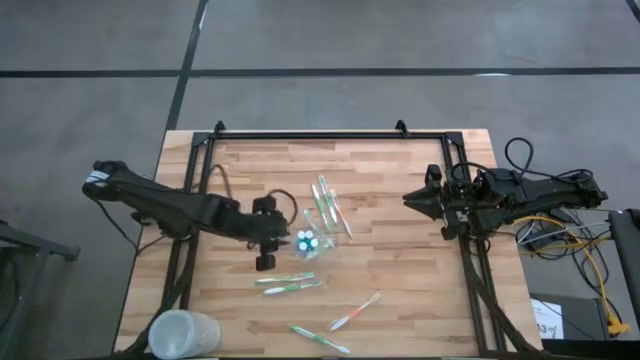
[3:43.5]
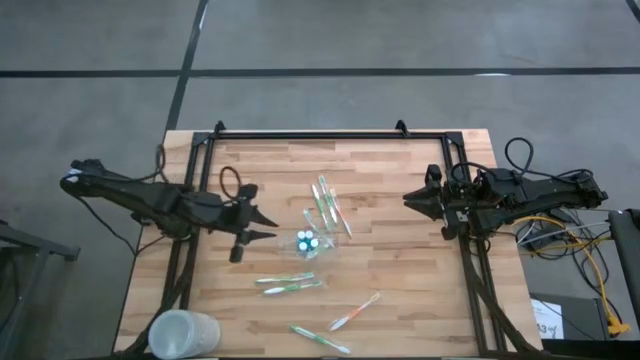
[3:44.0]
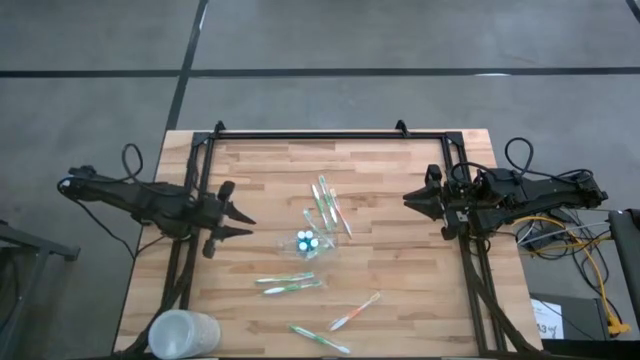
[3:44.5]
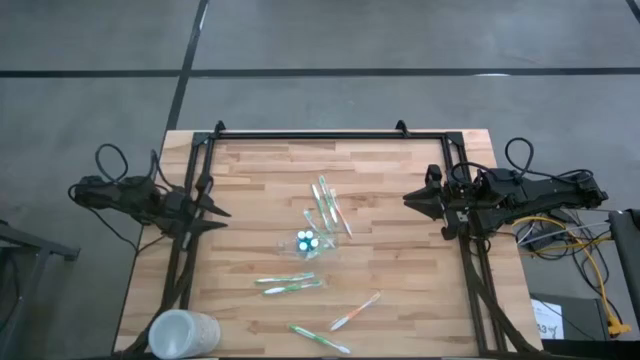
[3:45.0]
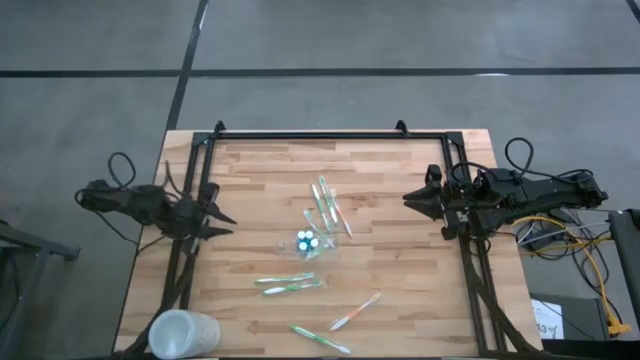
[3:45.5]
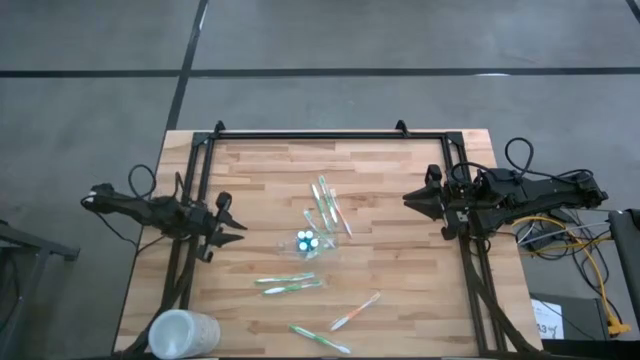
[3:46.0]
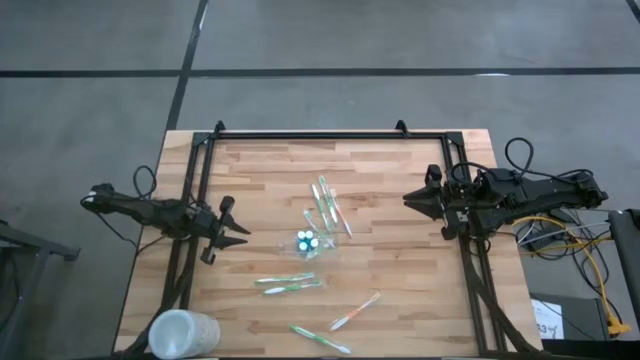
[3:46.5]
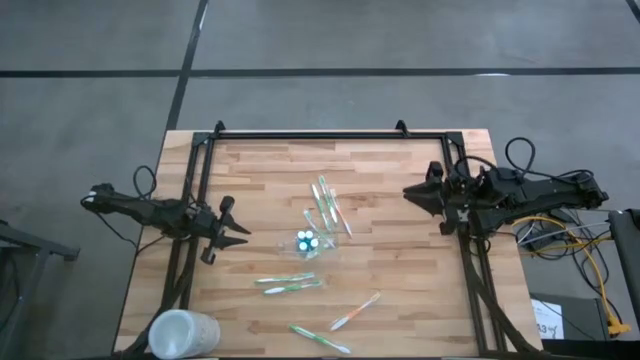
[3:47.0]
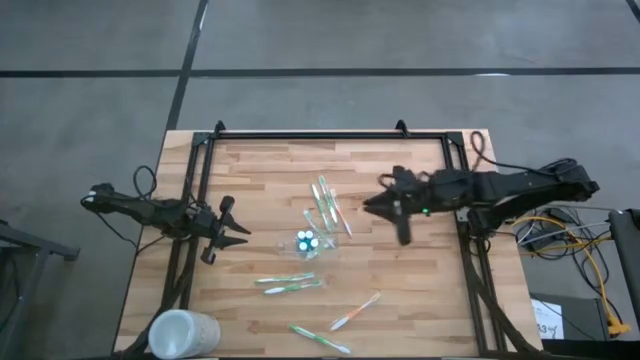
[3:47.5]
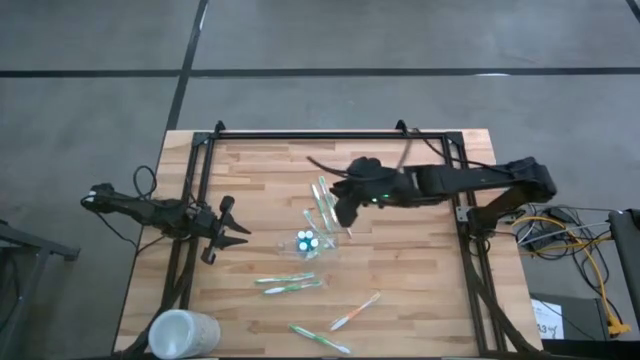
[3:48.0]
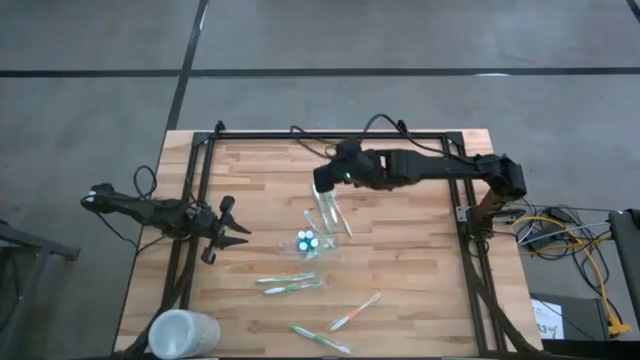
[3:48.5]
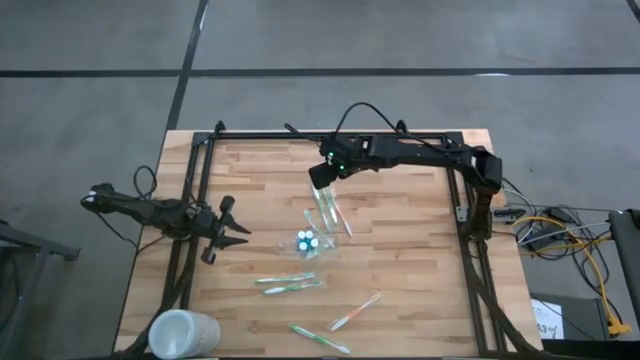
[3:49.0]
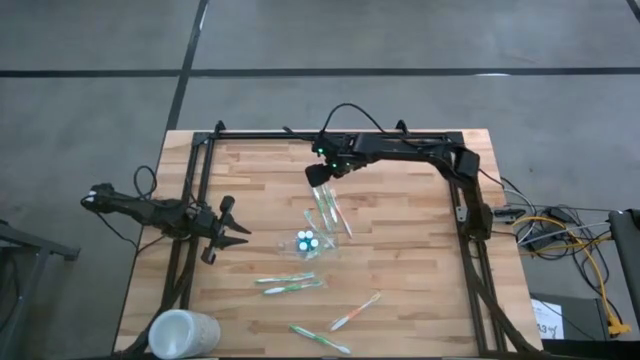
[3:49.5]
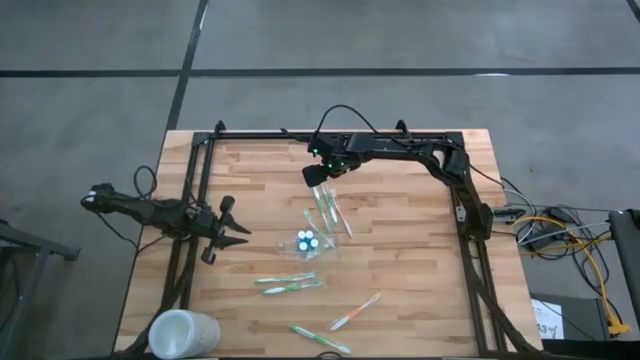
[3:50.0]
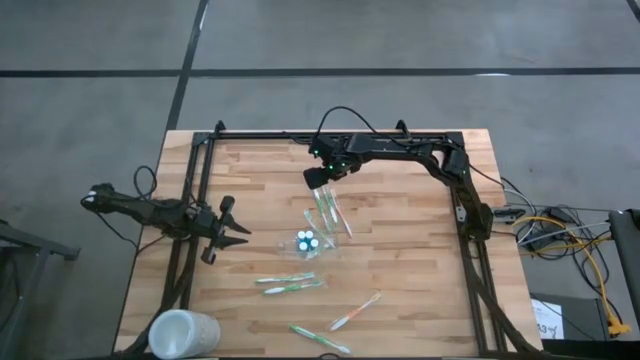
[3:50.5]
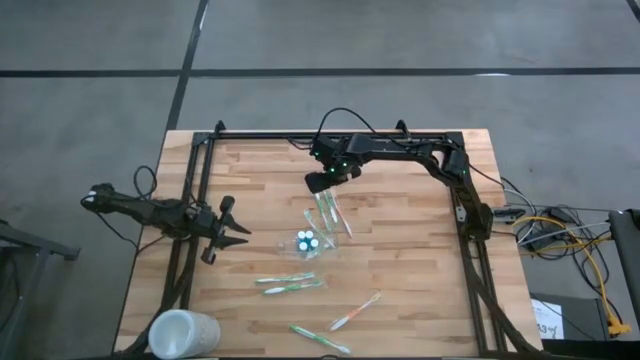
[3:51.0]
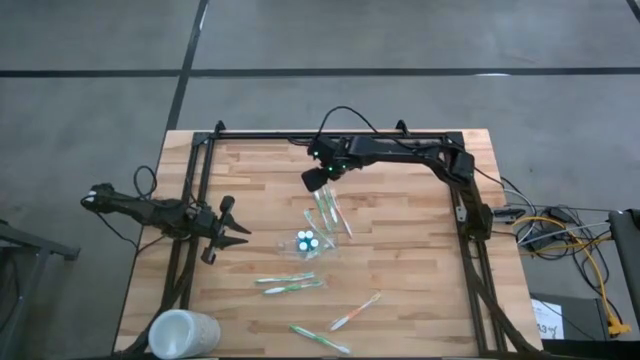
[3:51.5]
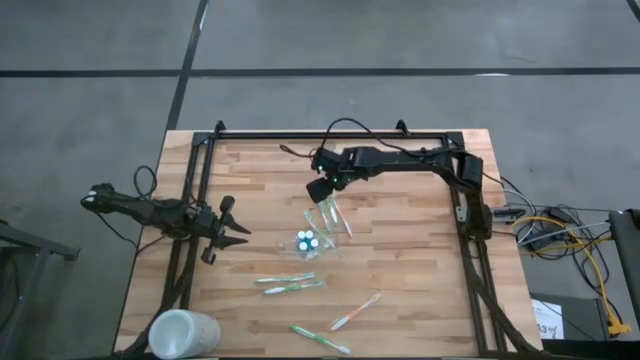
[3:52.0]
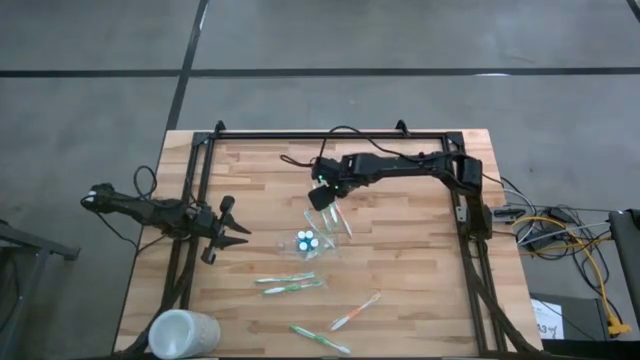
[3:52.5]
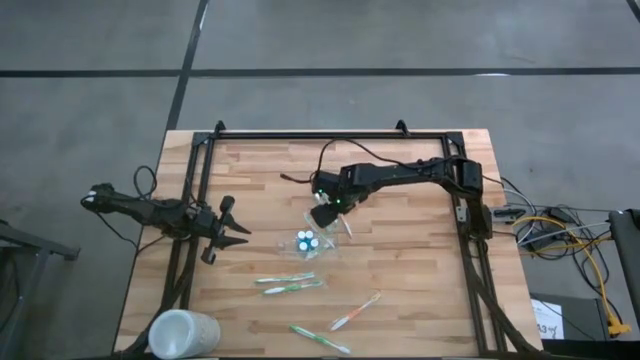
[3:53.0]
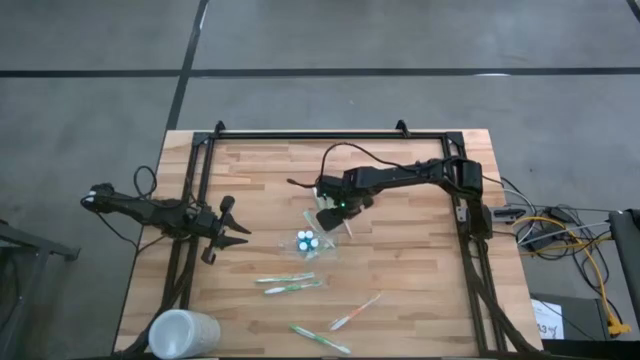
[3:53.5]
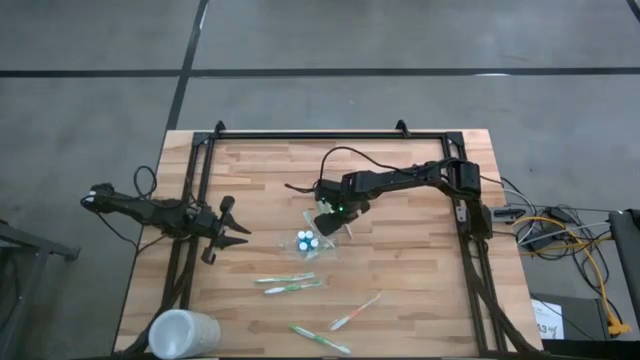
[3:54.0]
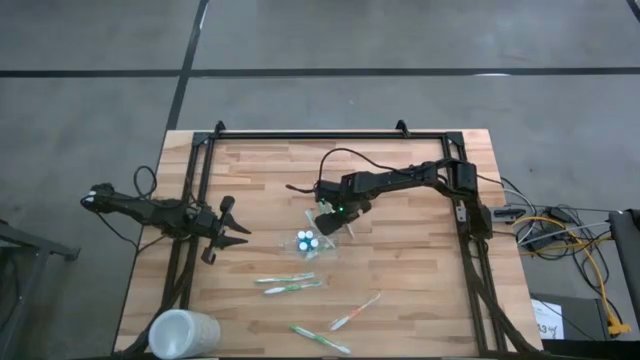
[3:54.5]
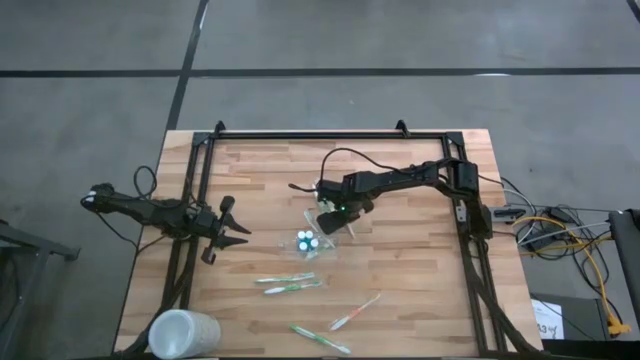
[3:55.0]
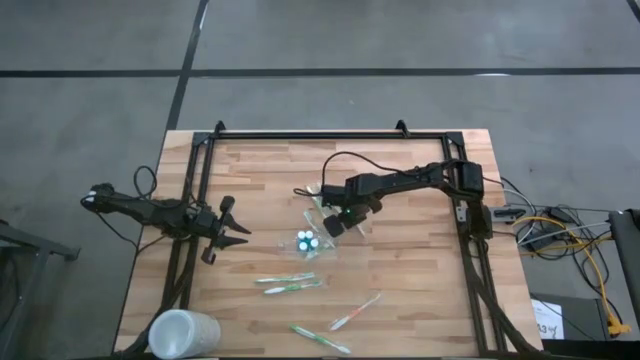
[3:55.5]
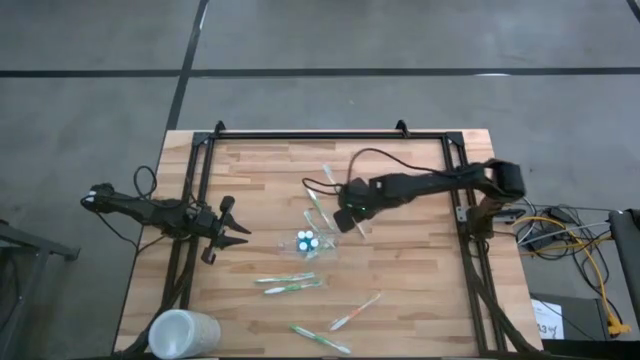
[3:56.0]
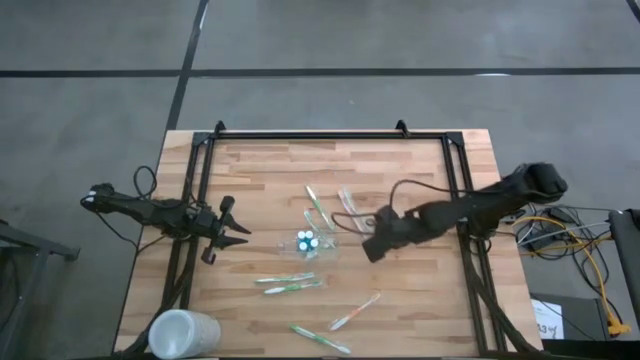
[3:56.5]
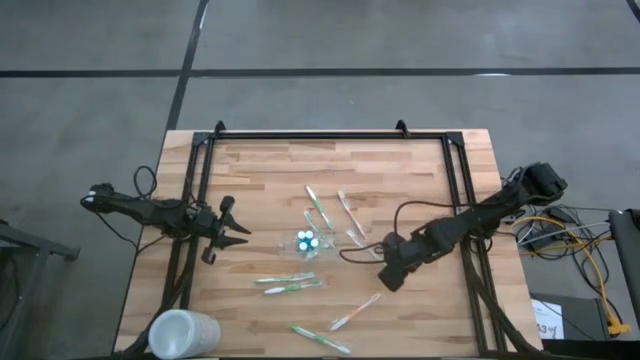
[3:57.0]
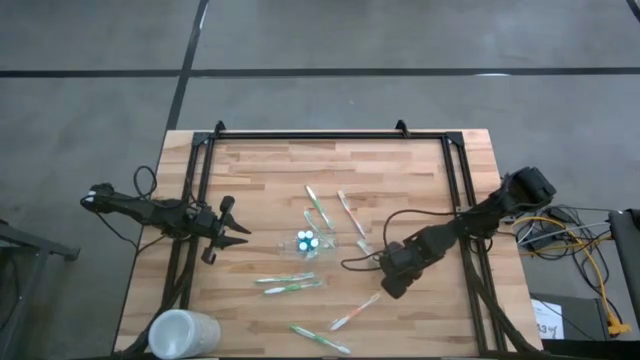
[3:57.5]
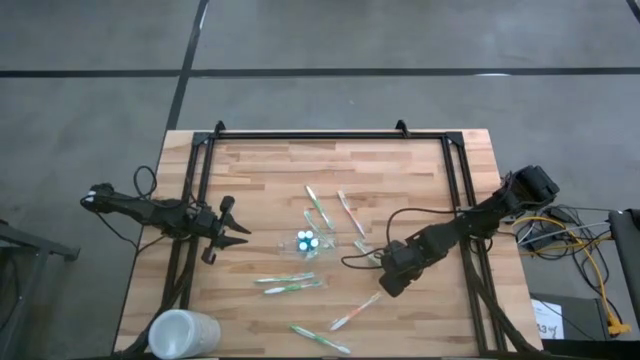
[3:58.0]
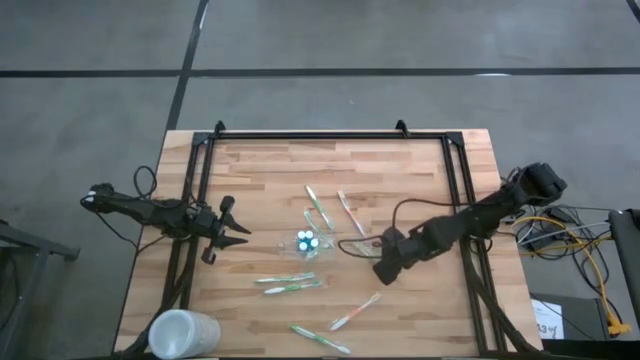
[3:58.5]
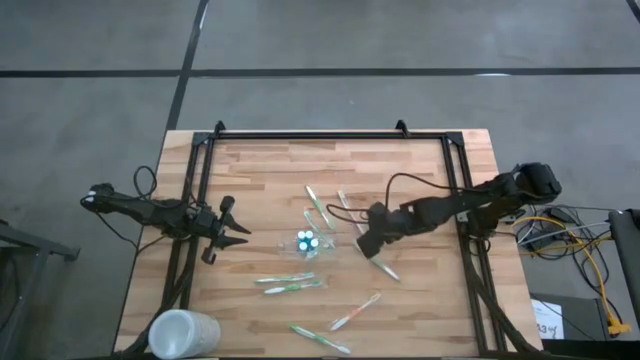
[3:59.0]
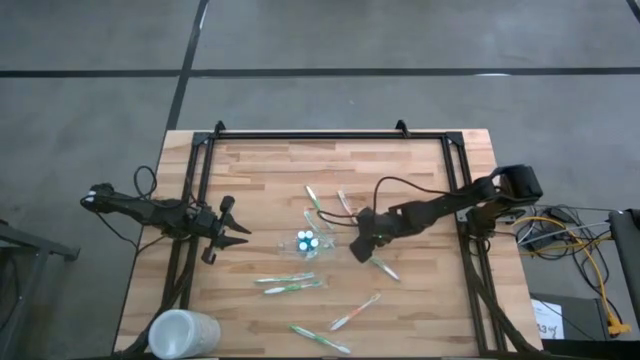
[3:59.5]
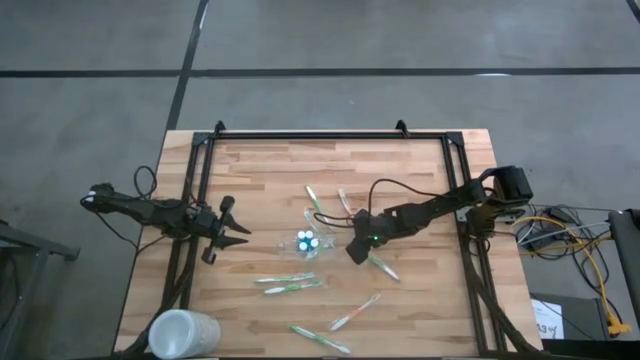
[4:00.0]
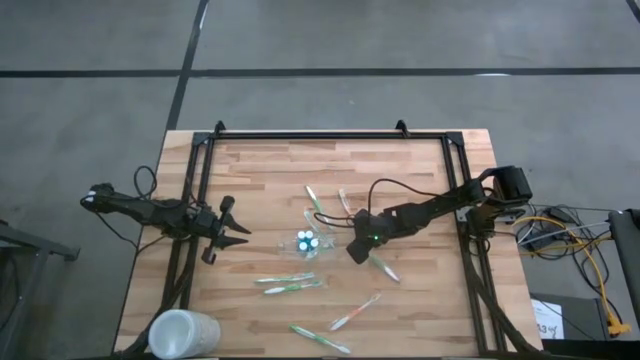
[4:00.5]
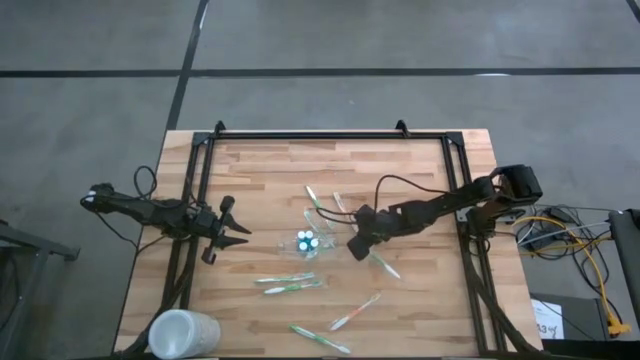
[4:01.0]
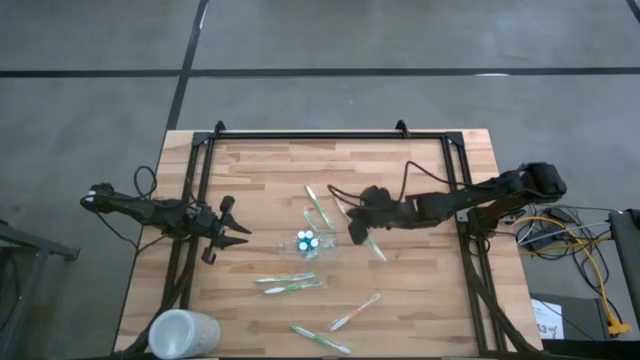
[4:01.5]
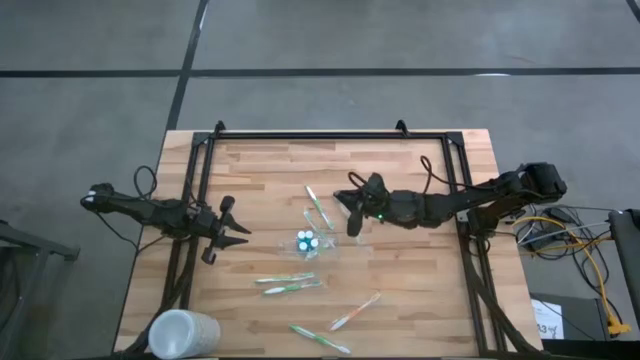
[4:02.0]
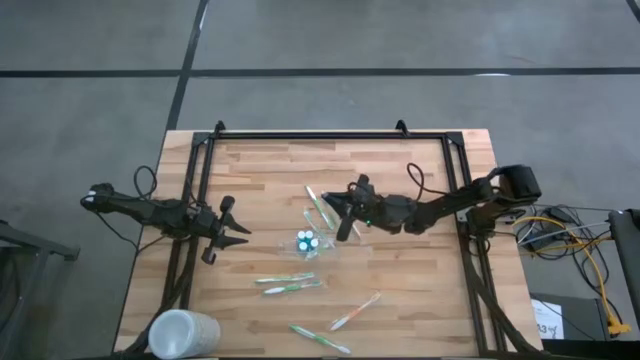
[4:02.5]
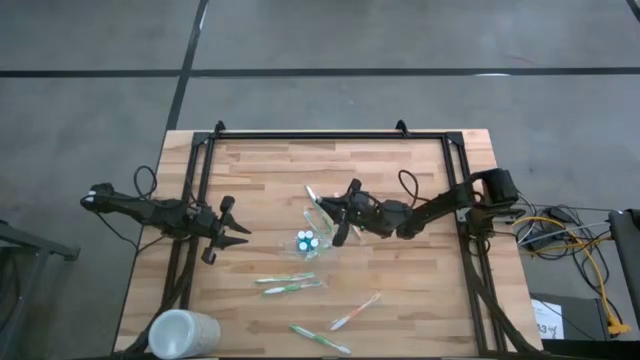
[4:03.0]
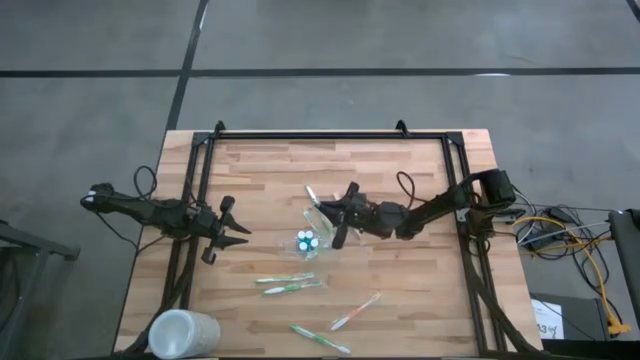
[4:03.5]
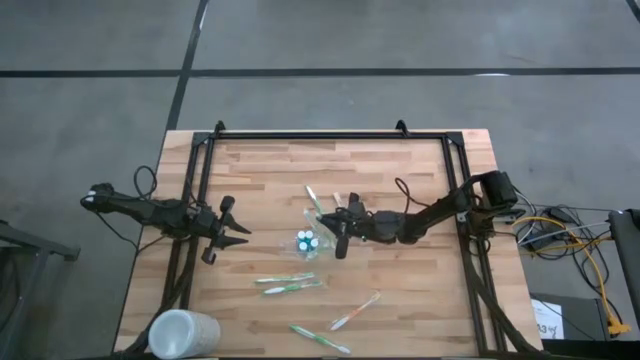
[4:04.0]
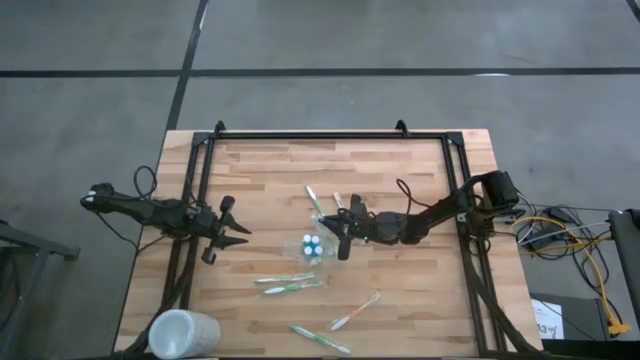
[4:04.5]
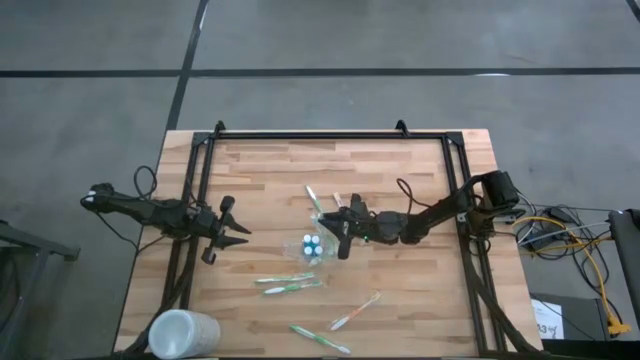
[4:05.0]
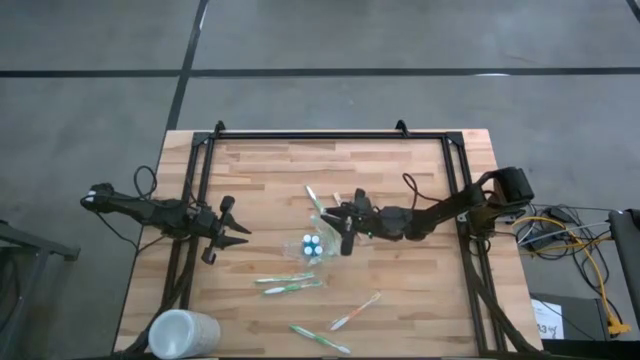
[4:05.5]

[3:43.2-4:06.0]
Task: Pick & Place toothbrushing station
Put the green toothbrush into the transparent organizer
